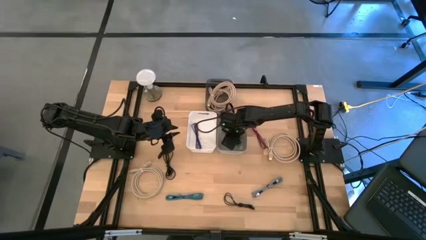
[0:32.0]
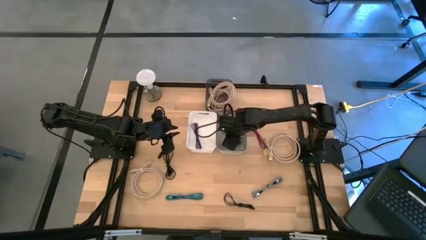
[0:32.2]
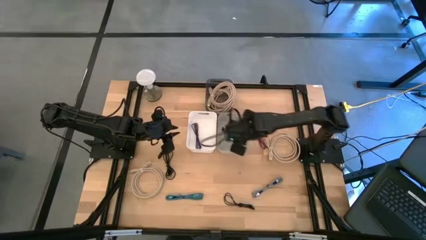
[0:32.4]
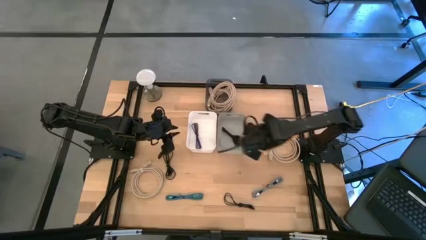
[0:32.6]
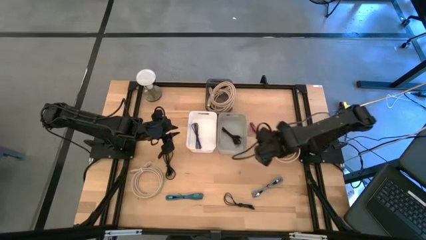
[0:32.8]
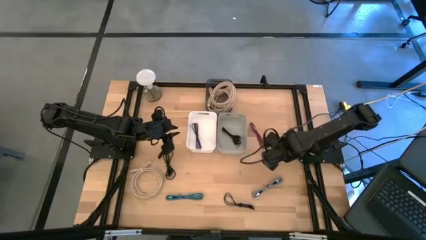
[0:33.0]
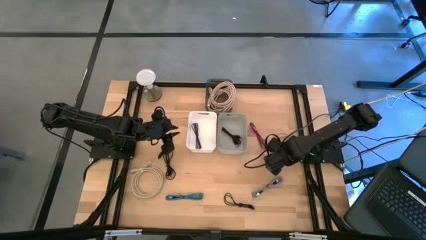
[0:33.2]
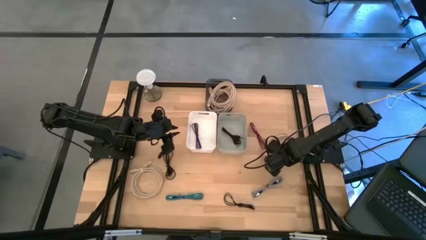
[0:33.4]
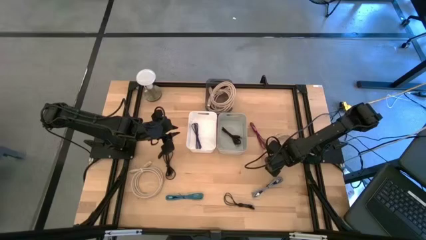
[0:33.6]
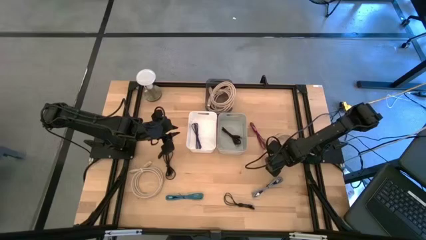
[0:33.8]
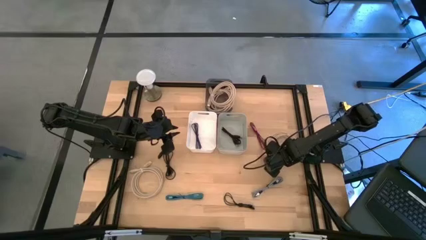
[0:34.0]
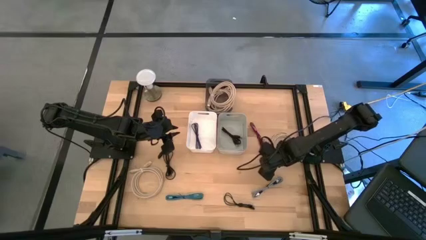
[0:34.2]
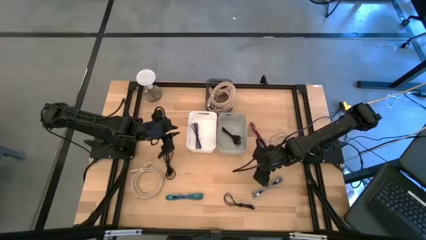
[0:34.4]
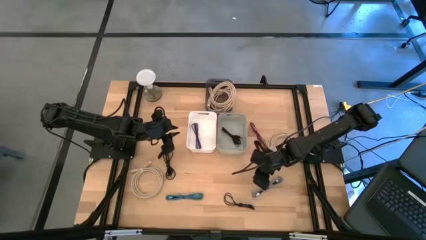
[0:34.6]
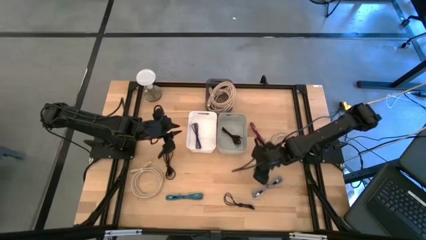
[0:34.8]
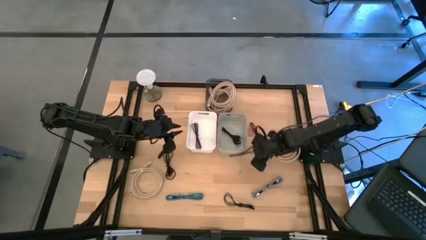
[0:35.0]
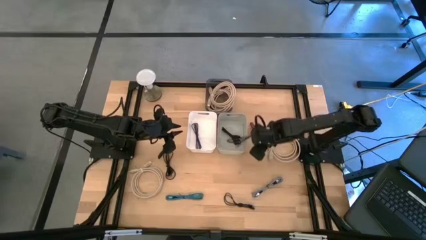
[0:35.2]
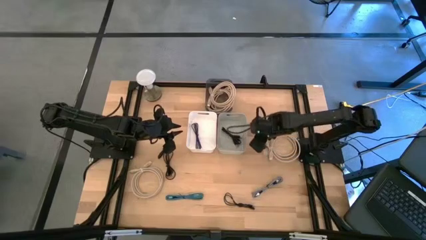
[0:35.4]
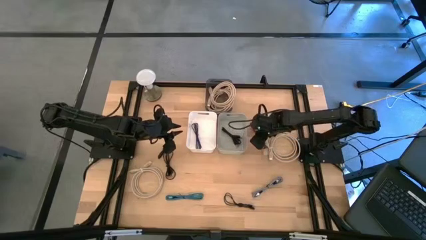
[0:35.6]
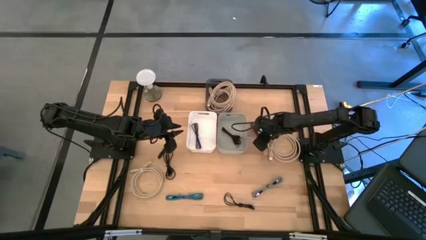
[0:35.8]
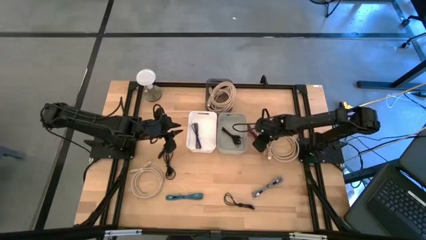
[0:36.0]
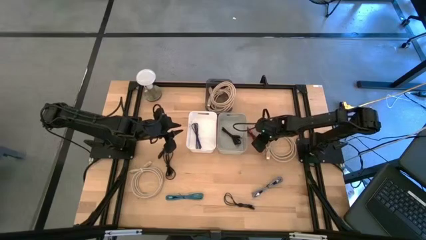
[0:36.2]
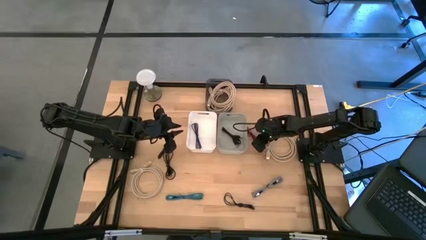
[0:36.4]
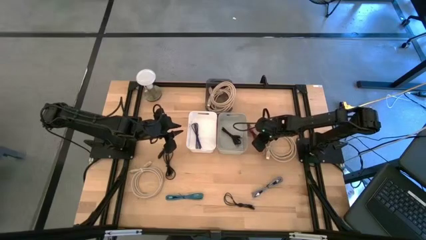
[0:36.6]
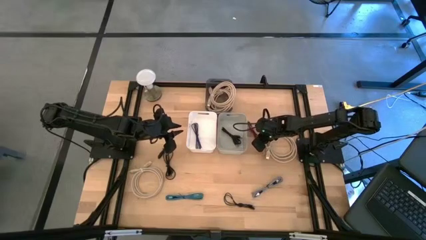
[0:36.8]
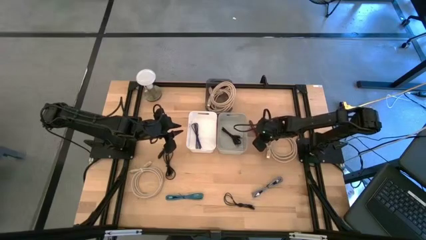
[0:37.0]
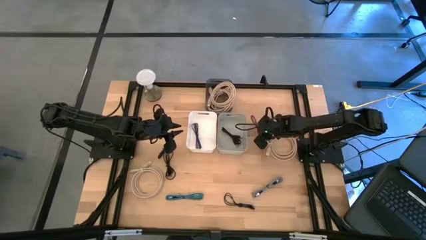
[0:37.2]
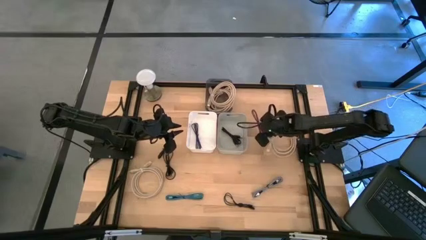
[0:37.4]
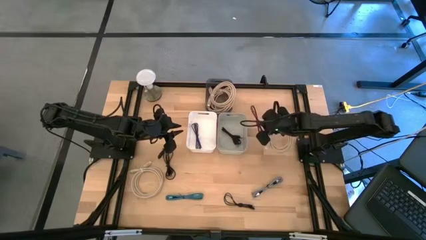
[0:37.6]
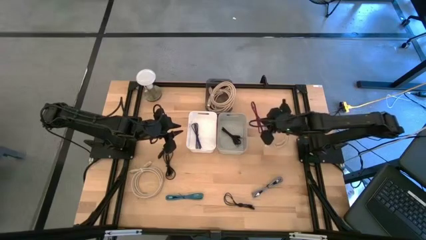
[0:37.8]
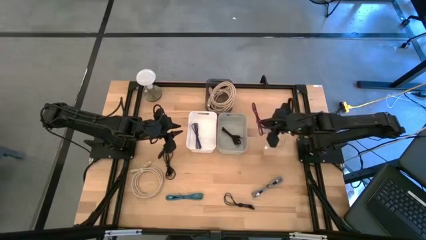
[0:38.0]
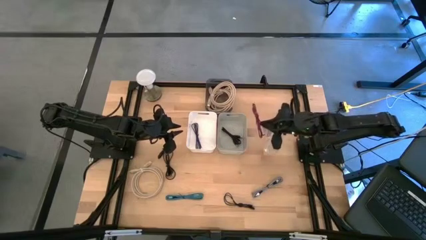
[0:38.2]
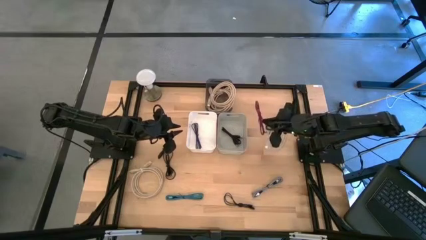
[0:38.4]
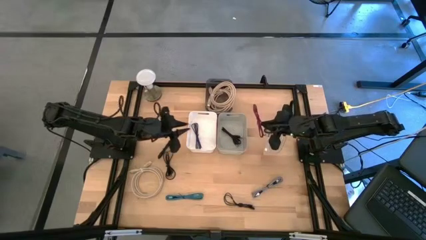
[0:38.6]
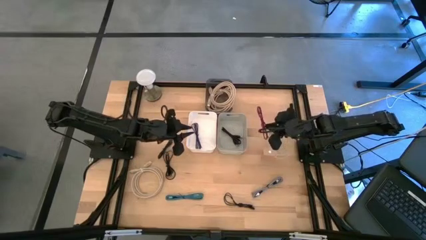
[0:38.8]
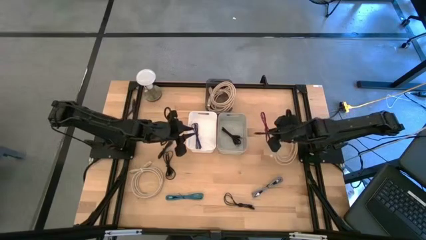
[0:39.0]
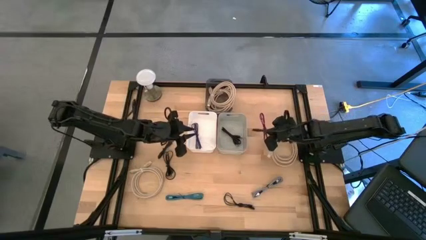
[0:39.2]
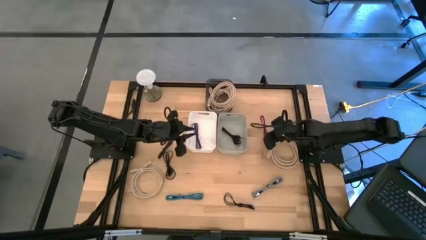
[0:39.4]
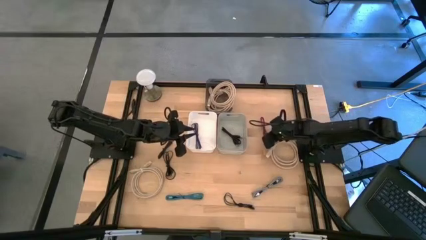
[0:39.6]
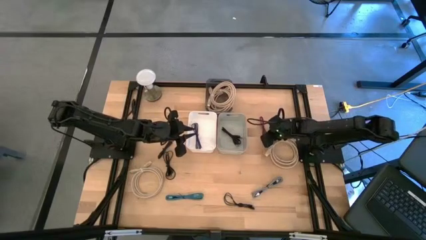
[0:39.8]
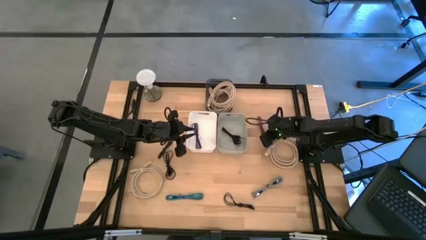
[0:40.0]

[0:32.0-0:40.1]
Task: Pick & Place USB Port
Put the pink patterned charger cable into the white bin

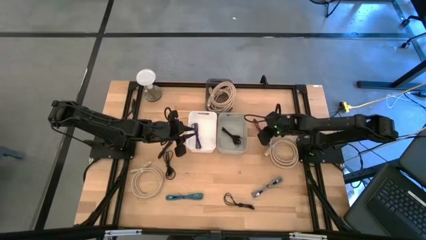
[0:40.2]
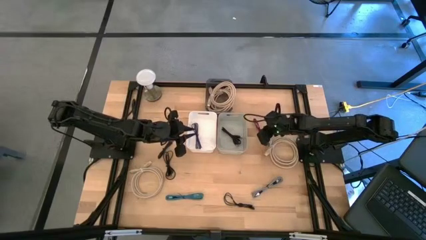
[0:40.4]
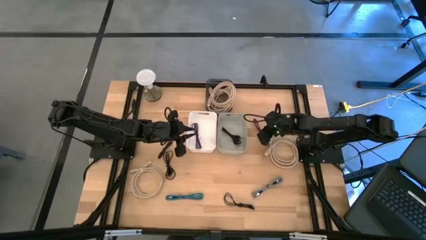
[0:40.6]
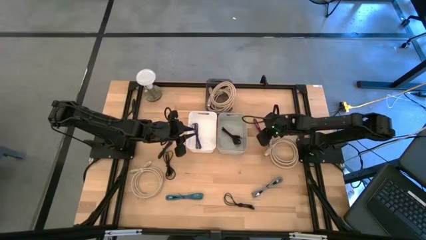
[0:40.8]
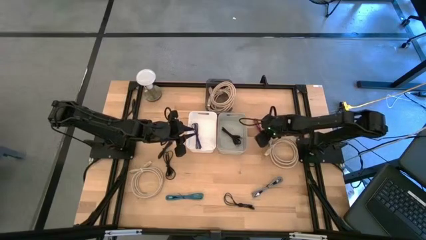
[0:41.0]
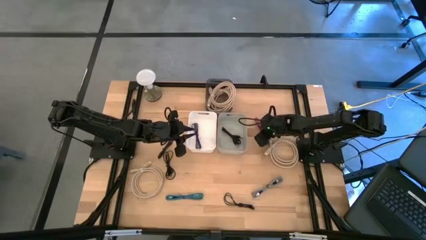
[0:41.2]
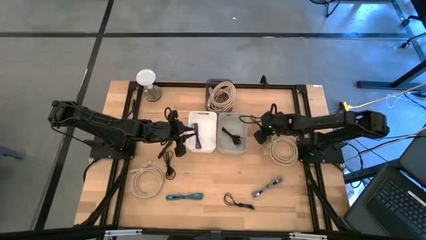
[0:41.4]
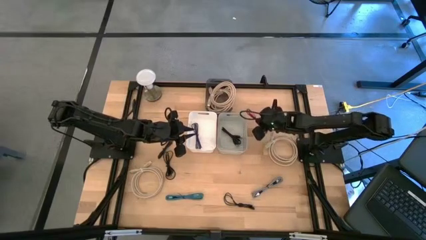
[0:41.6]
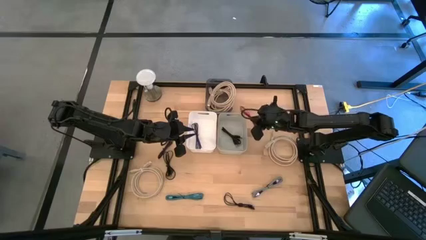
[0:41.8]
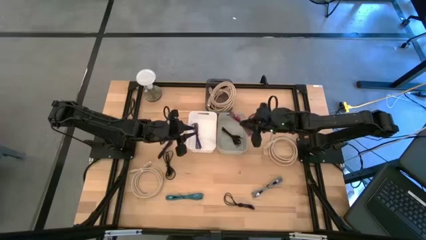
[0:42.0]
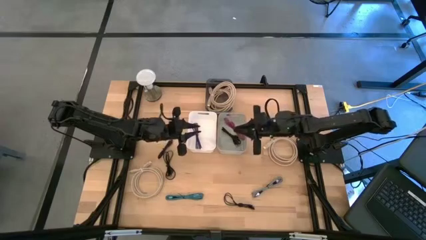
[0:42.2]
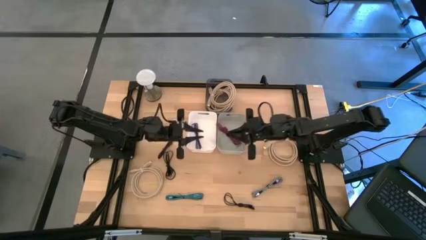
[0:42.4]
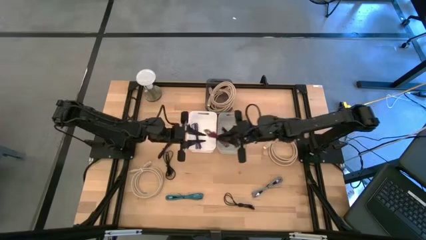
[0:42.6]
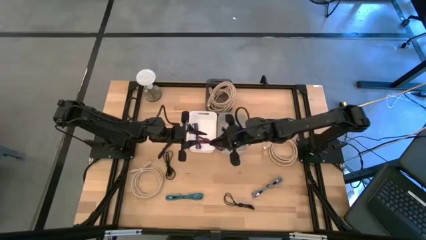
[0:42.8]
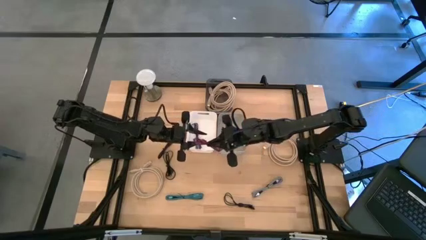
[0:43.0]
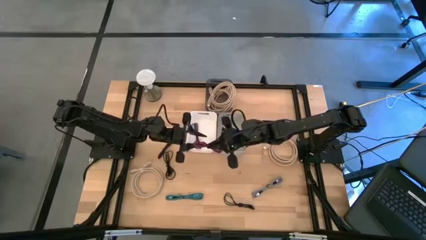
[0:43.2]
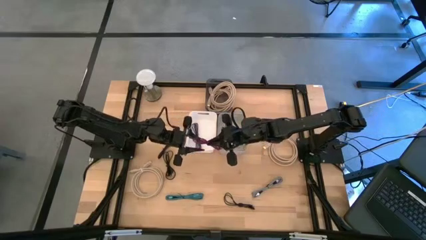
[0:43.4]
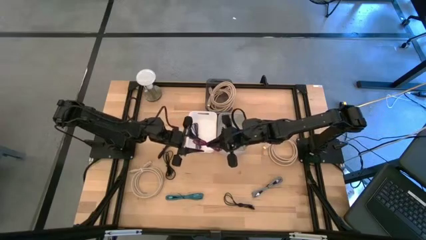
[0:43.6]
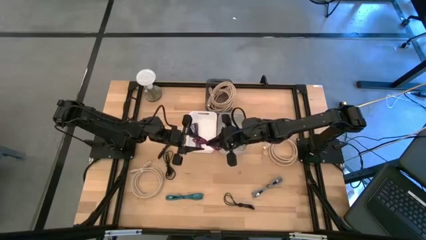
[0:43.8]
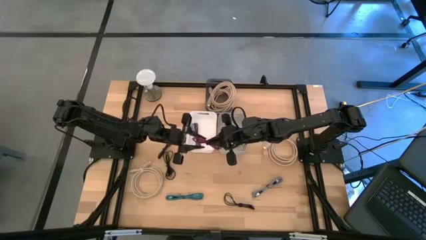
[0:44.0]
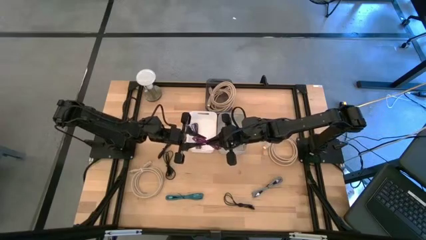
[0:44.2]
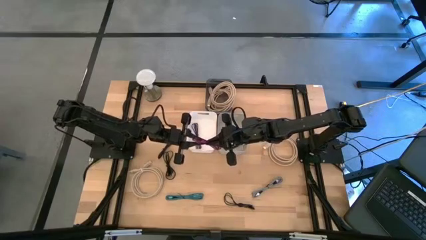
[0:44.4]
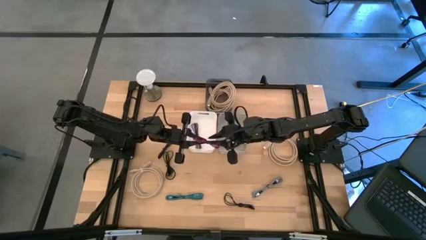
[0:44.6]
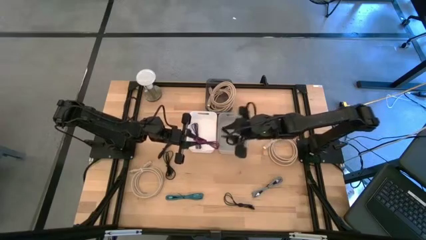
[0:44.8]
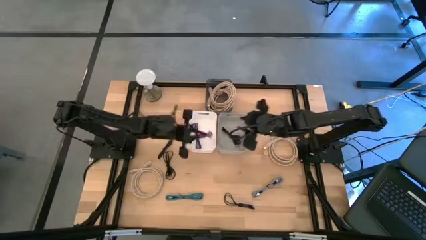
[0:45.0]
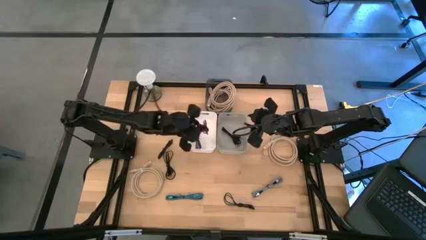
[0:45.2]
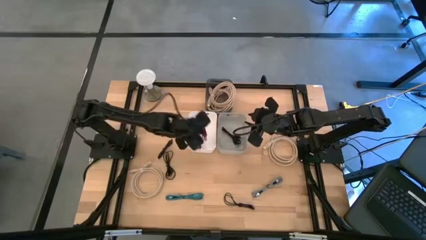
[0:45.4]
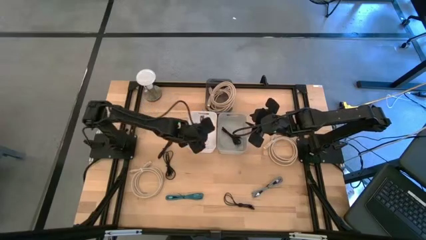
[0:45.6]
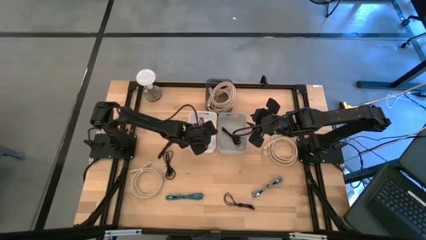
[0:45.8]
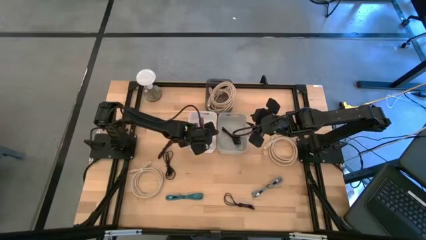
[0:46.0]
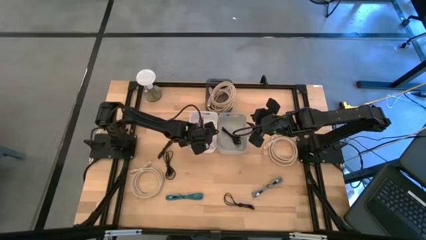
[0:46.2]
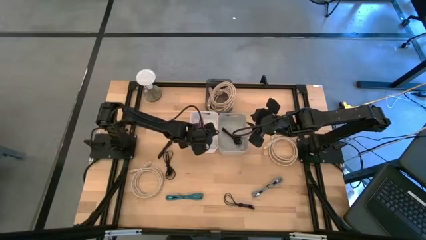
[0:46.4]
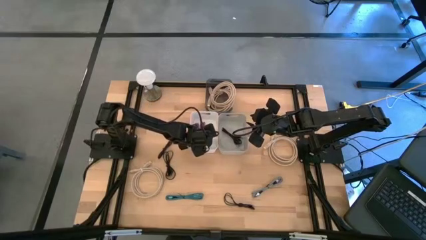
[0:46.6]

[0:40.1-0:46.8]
Put the pink patterned charger cable into the white bin

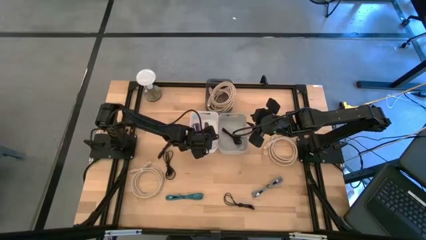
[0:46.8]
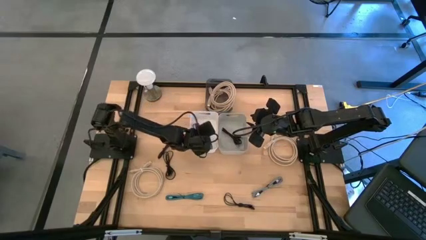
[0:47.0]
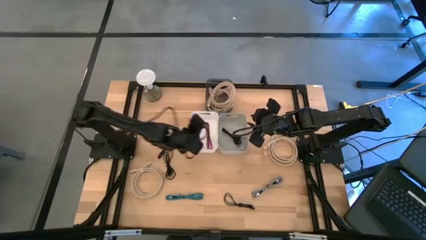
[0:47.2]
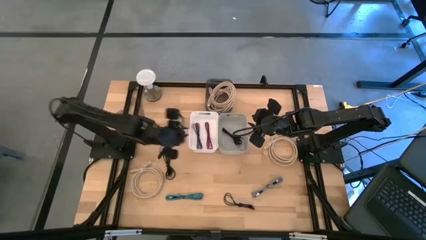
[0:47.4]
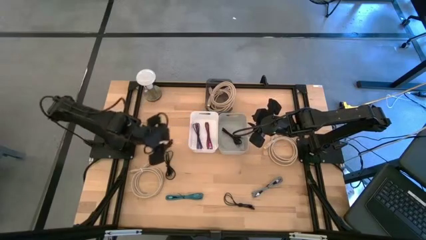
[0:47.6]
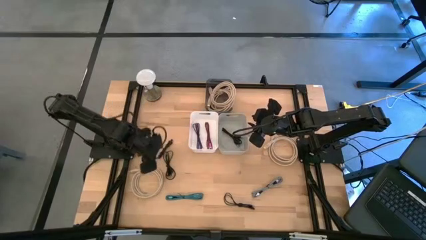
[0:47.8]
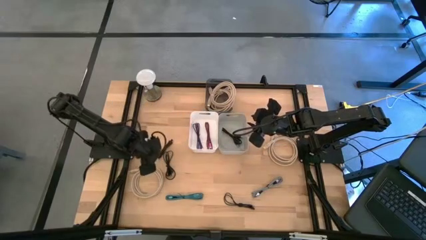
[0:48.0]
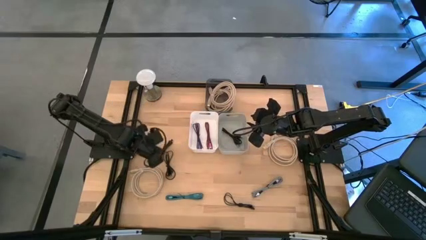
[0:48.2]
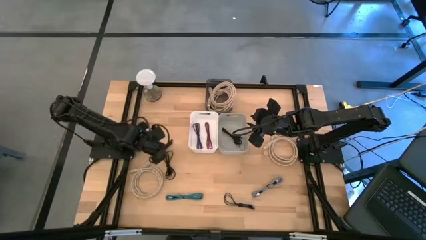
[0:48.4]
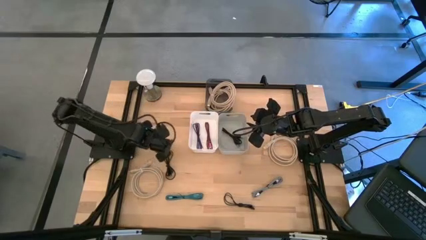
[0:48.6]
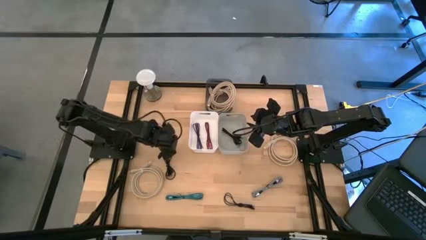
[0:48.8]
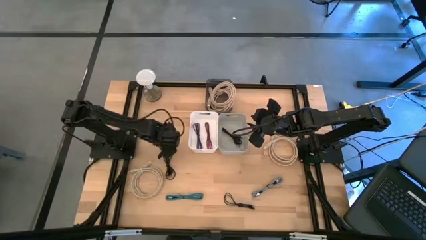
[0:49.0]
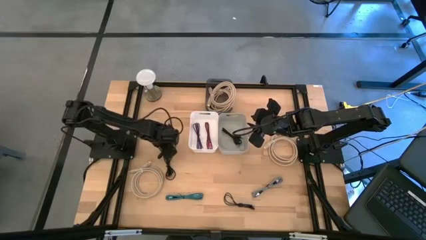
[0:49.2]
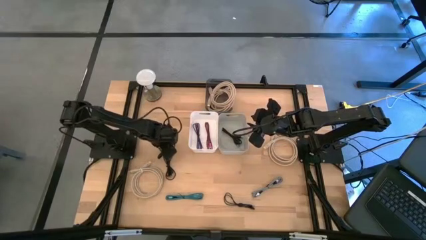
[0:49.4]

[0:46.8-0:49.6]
Put the black charger cable into the gray bin
